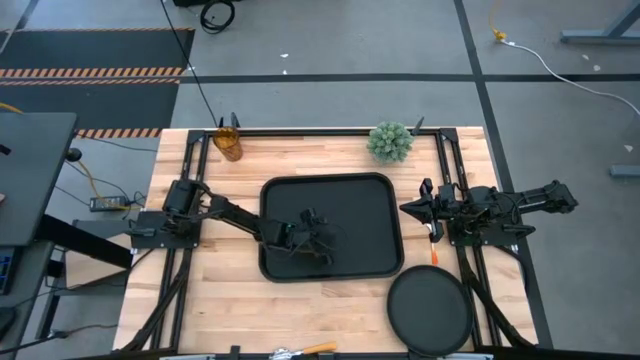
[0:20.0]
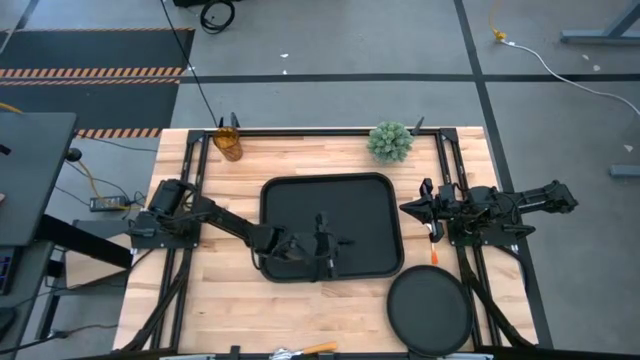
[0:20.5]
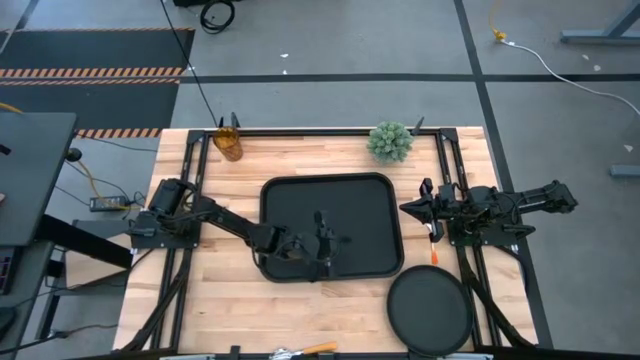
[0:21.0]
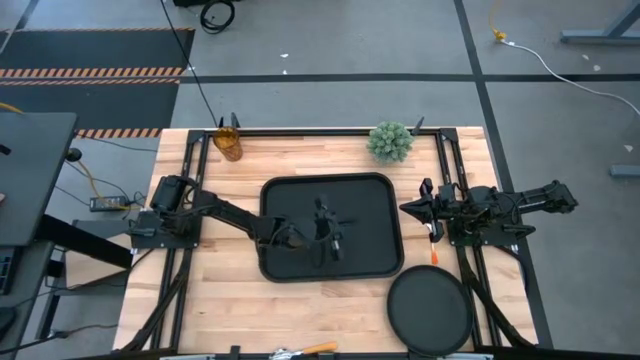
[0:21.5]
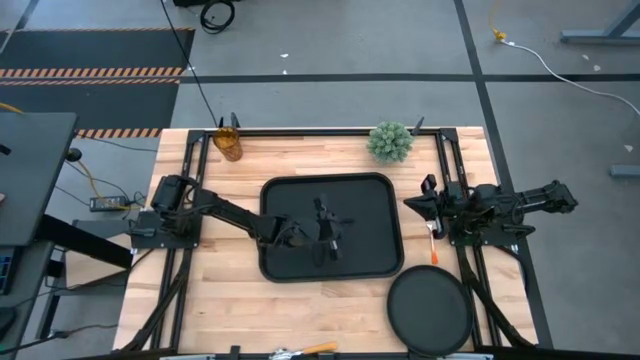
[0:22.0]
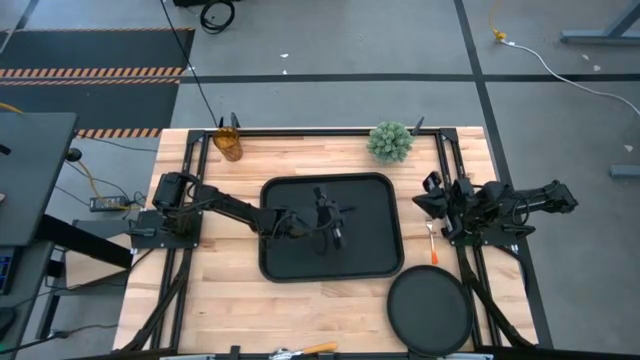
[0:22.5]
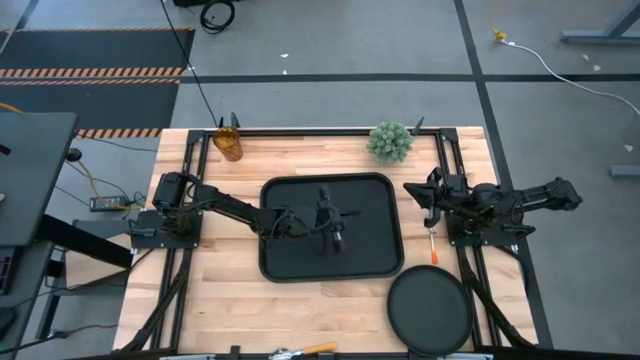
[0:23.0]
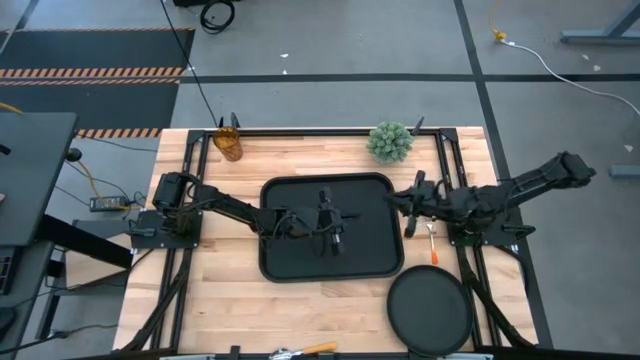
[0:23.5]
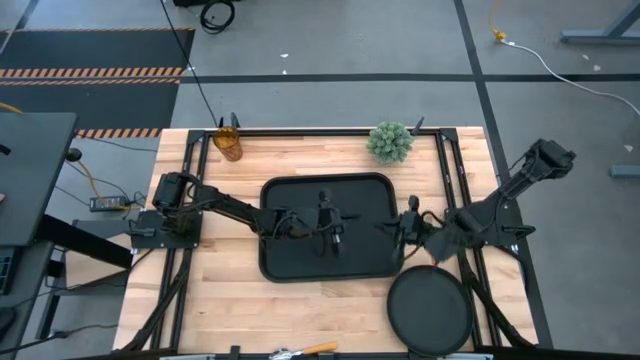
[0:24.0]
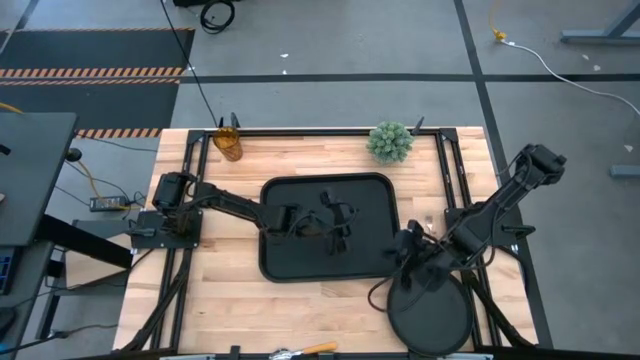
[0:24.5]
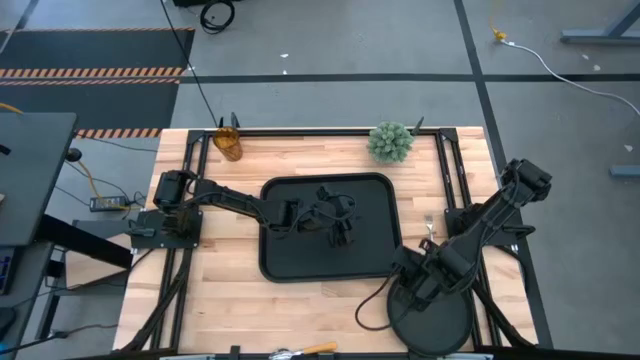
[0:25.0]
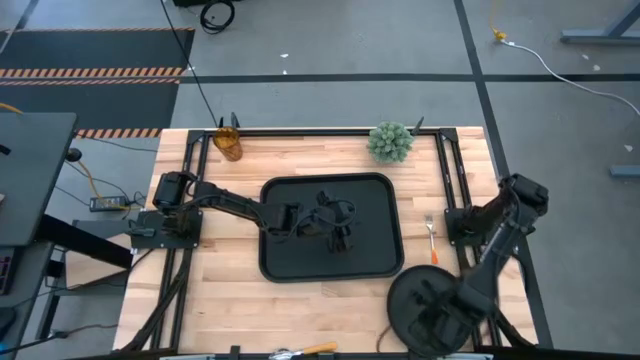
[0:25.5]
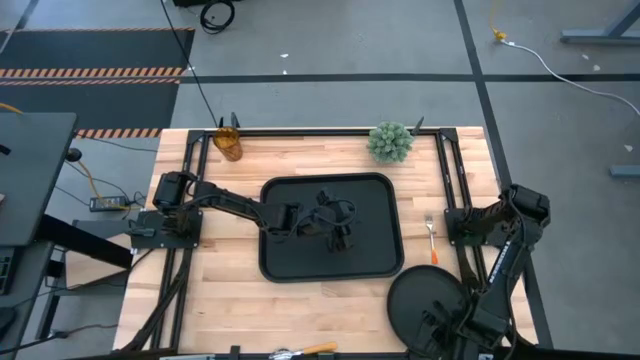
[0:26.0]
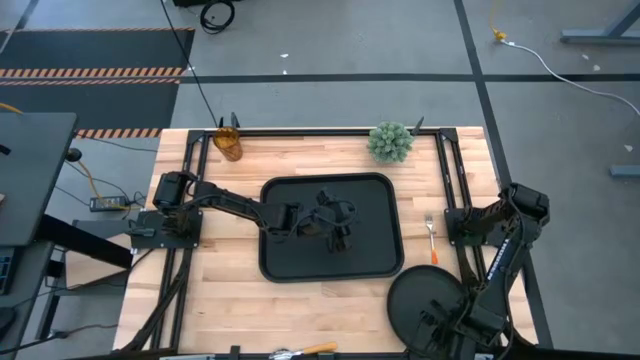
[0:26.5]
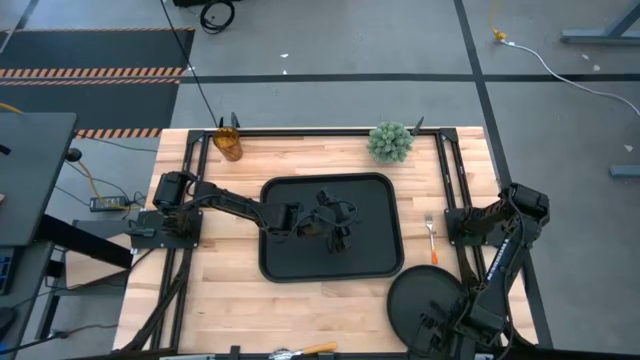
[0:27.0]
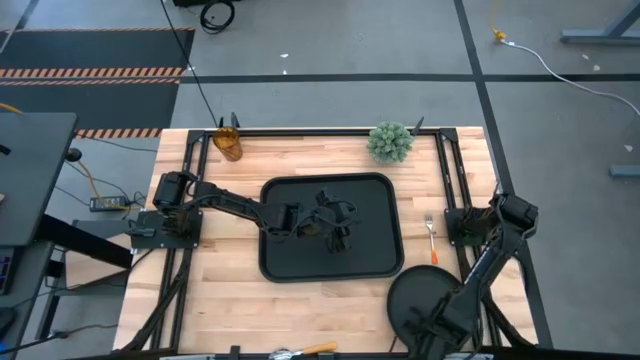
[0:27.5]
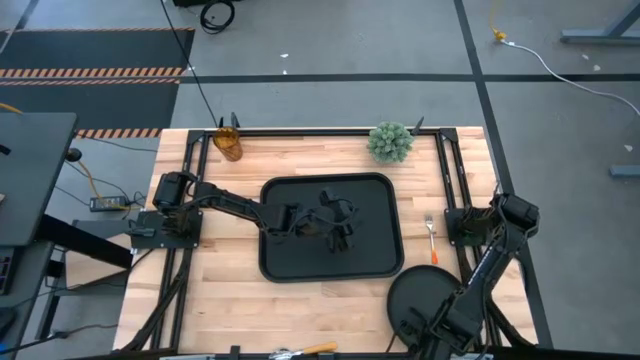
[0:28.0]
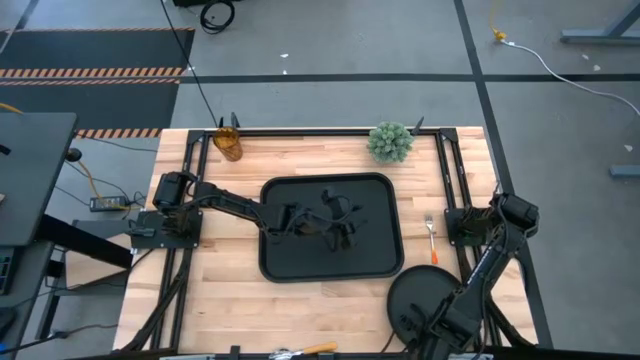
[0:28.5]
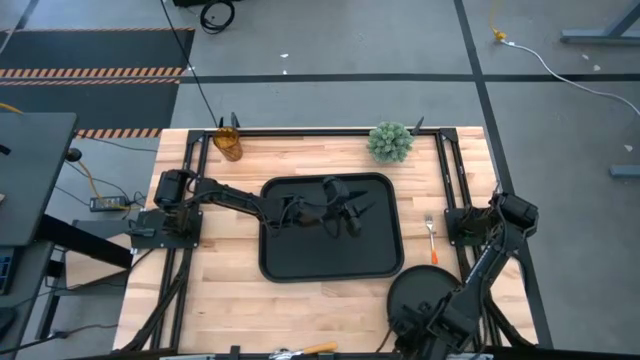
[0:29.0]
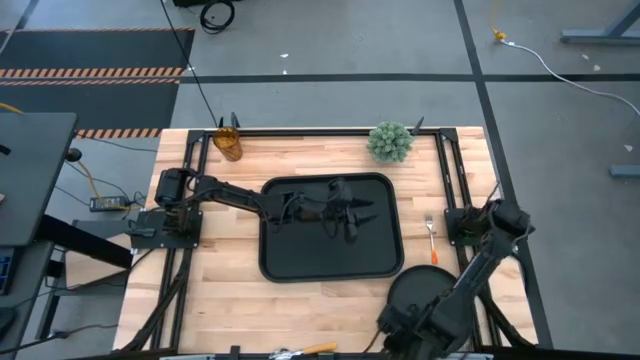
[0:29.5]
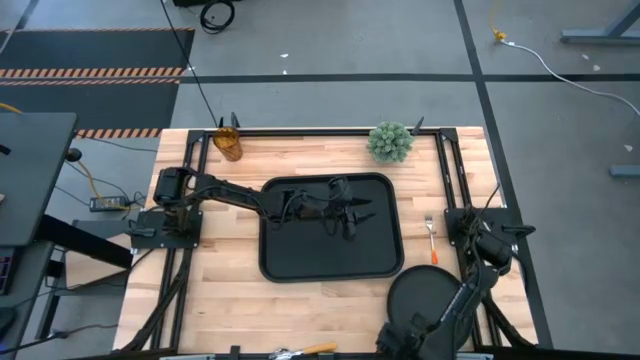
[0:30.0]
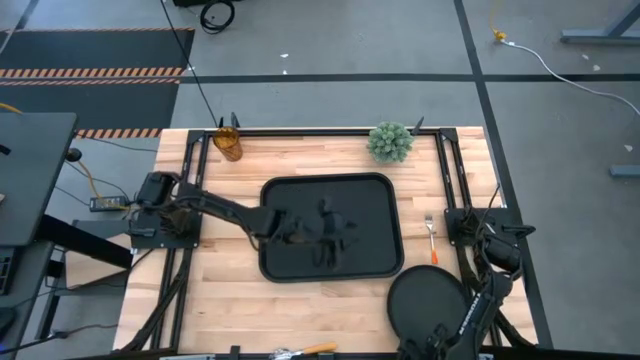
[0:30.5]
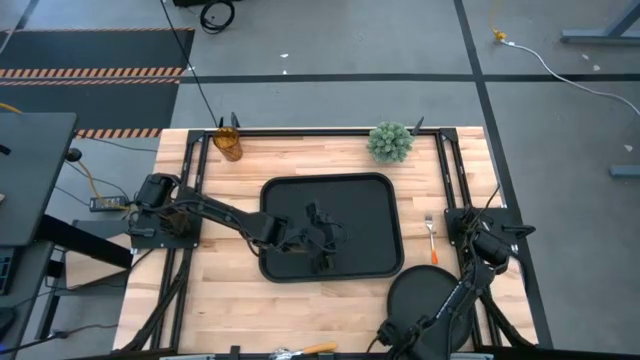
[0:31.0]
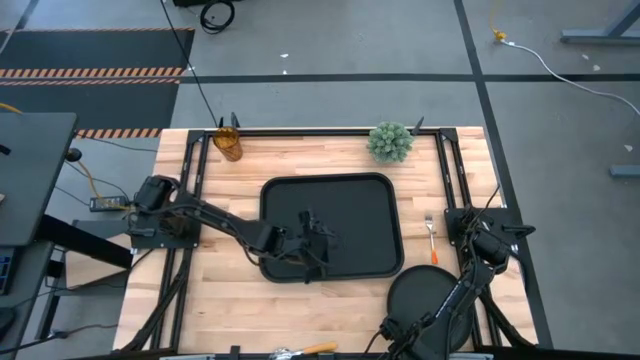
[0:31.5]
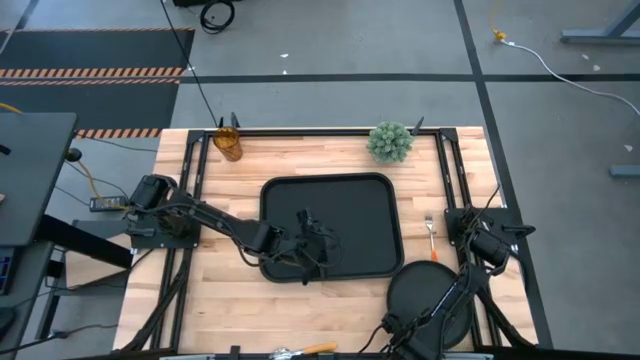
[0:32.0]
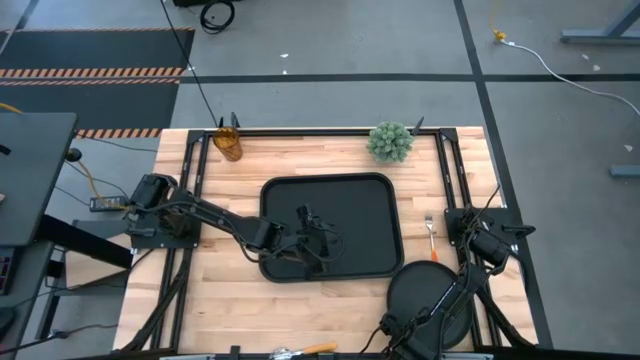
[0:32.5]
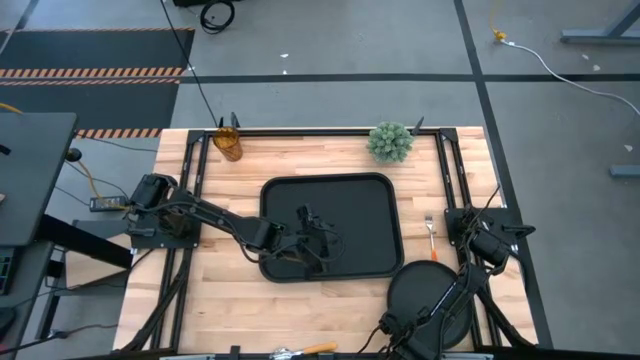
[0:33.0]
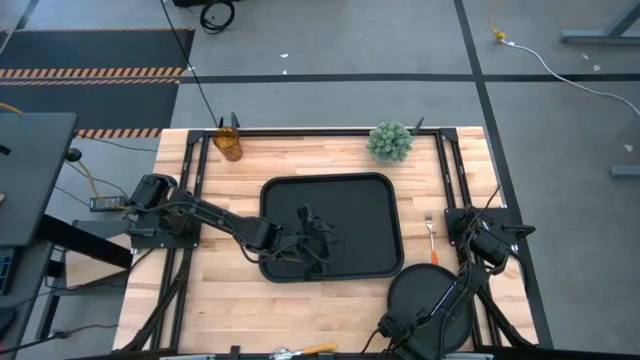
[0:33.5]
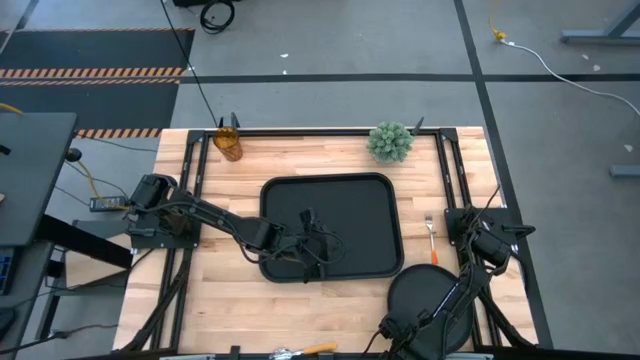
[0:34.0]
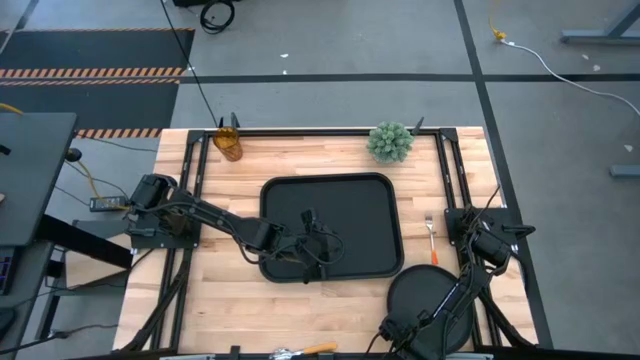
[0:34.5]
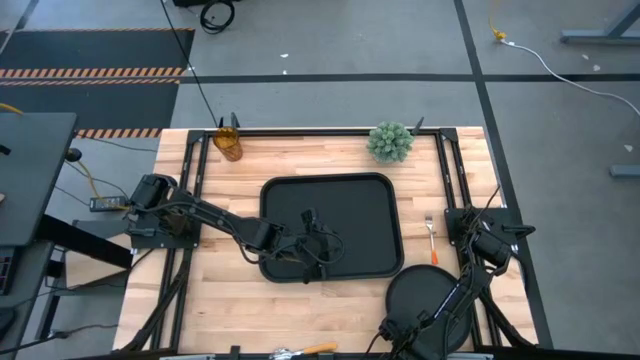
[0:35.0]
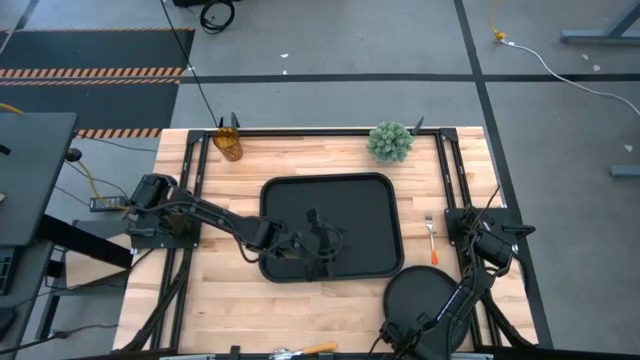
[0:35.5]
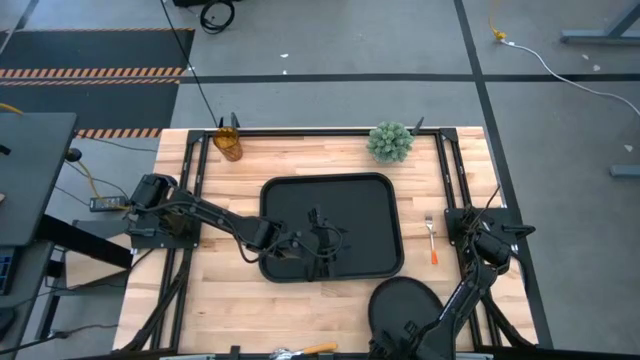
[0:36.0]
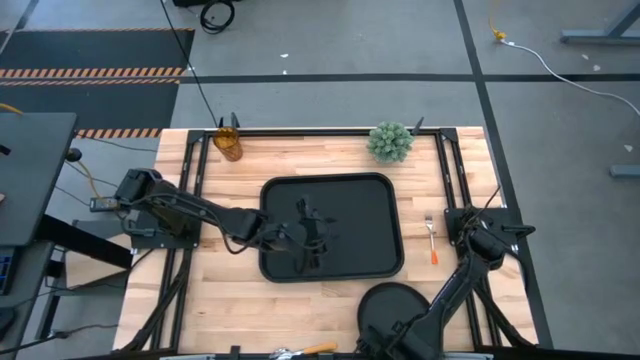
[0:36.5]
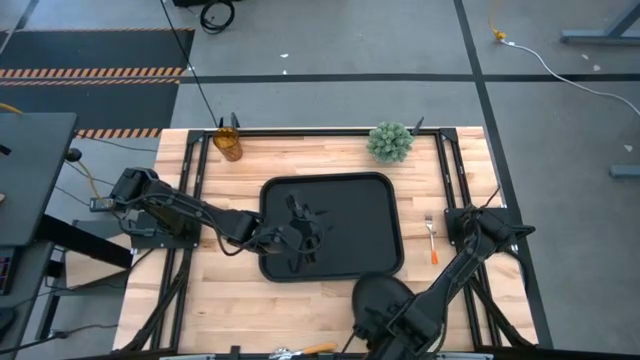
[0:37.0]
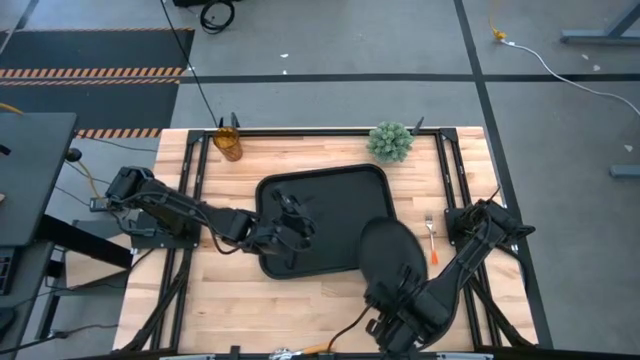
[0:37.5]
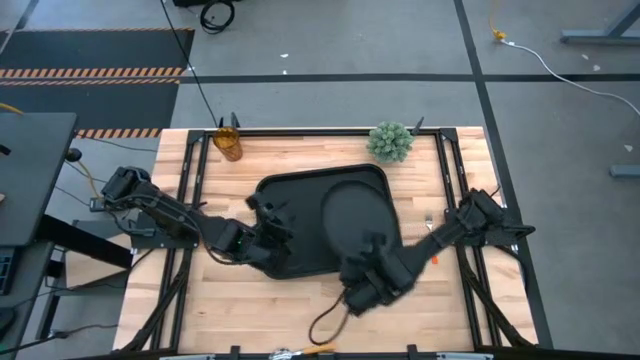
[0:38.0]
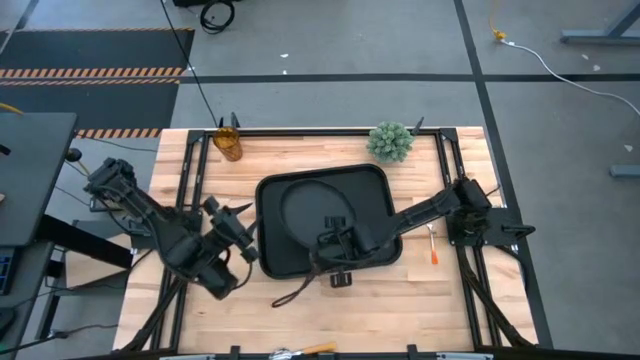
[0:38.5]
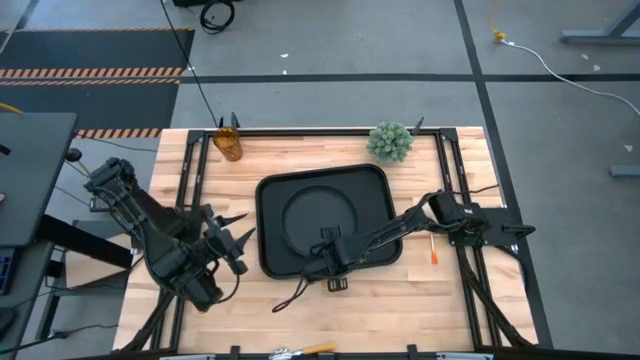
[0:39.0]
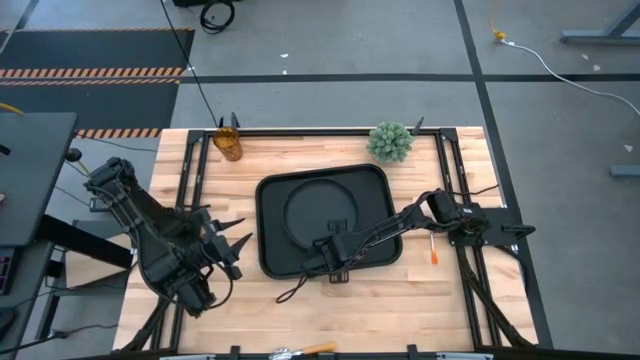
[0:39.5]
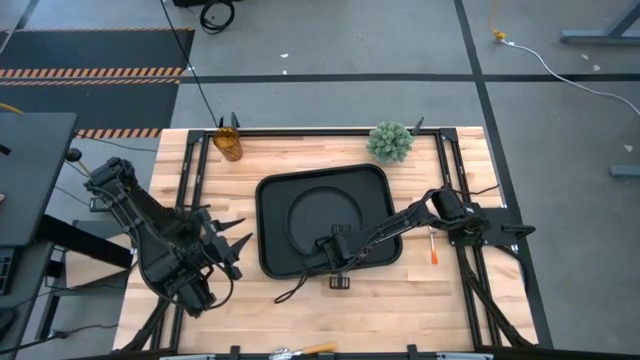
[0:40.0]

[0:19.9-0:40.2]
Task: Pick and place plate/cup/fork/spoon on tray
Put the black plate on the black serving tray

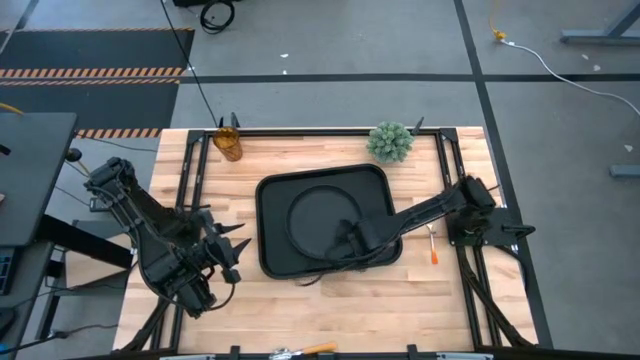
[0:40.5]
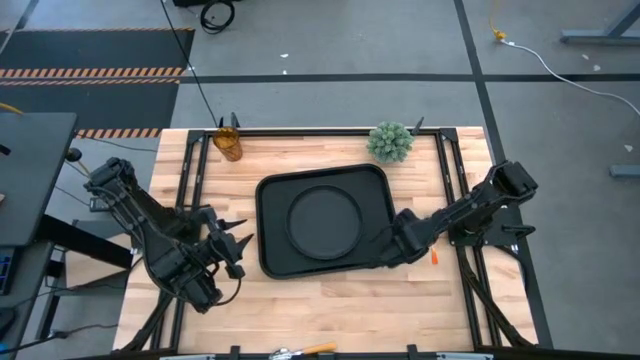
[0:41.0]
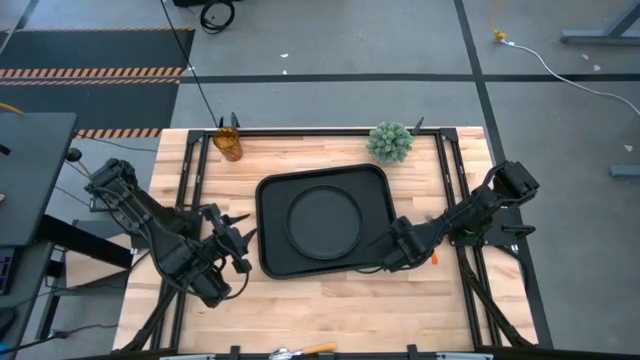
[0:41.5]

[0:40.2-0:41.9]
Adjust the black serving tray on the table
